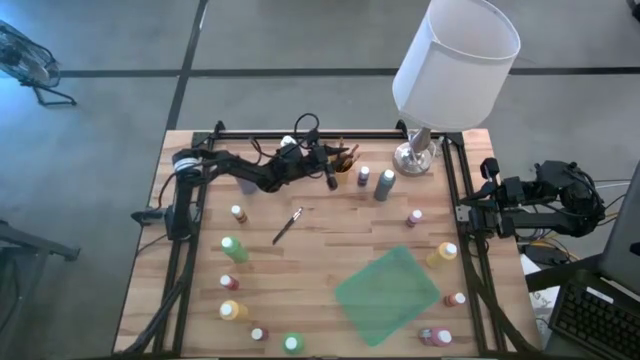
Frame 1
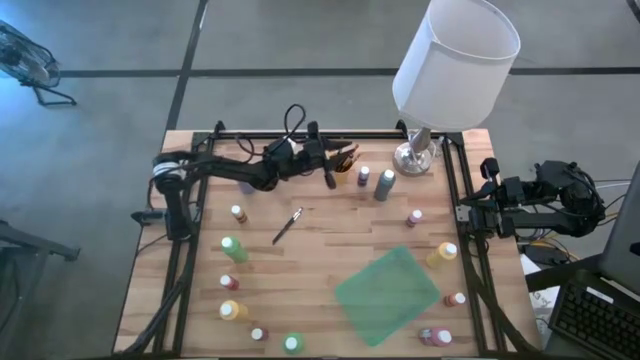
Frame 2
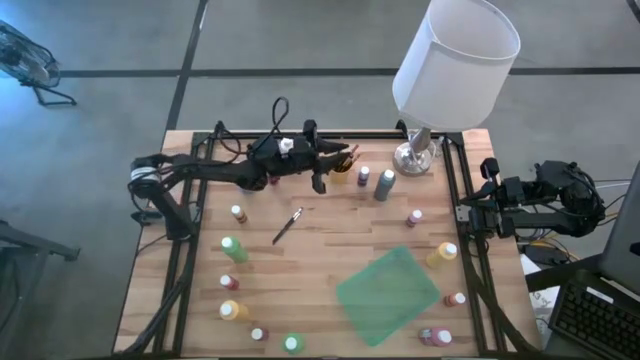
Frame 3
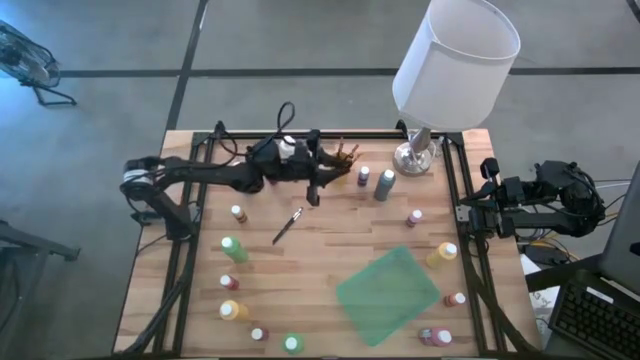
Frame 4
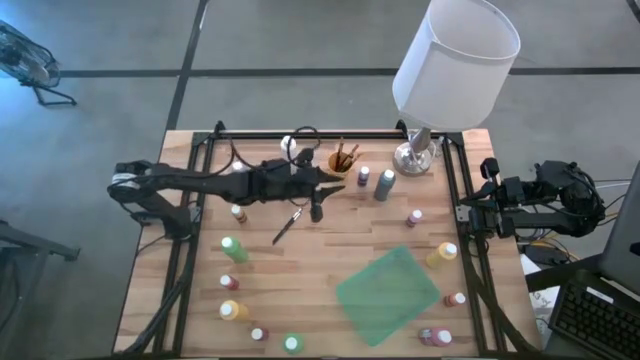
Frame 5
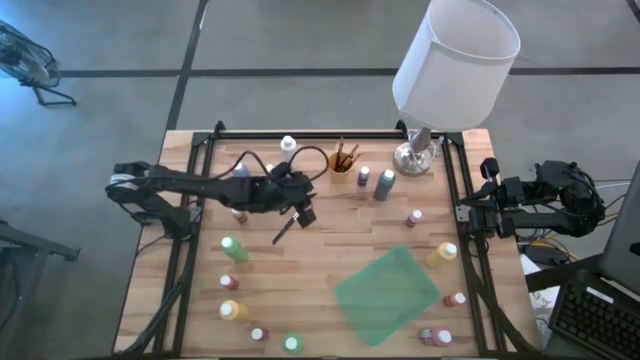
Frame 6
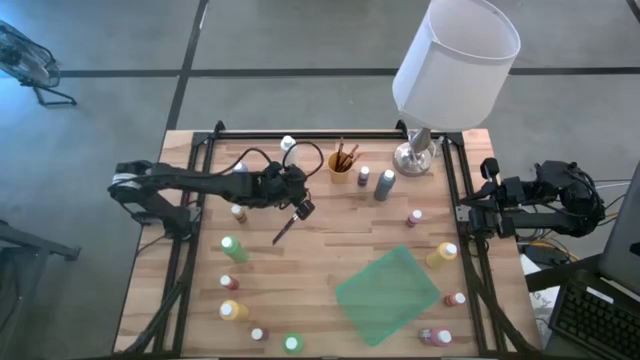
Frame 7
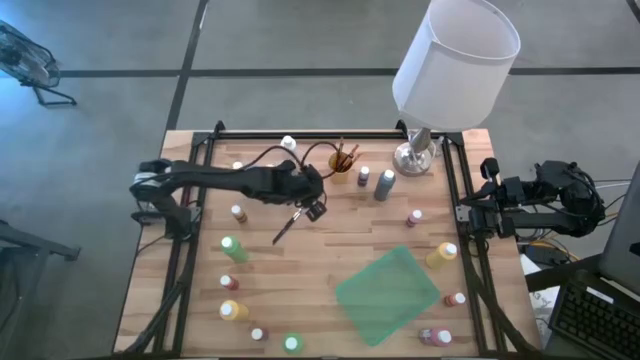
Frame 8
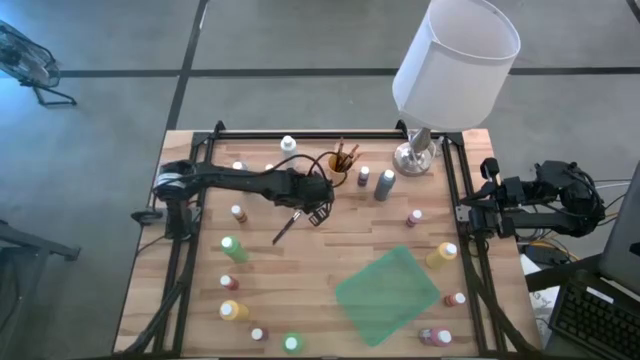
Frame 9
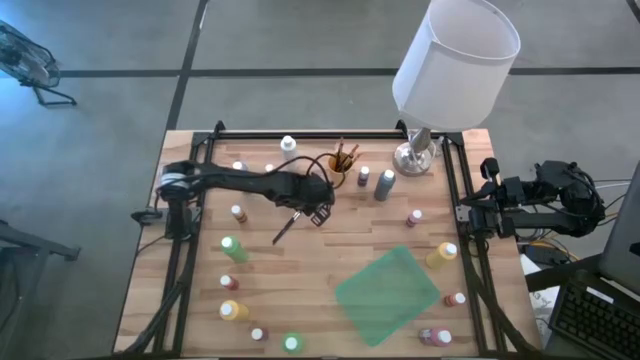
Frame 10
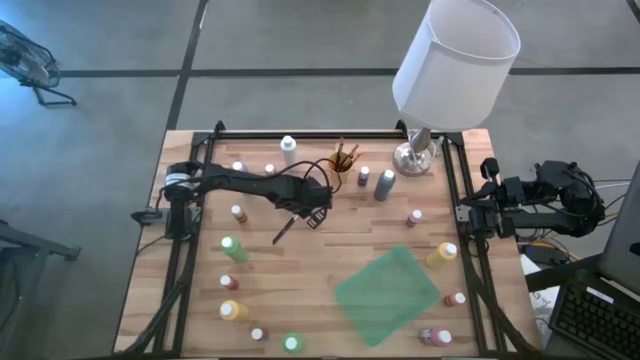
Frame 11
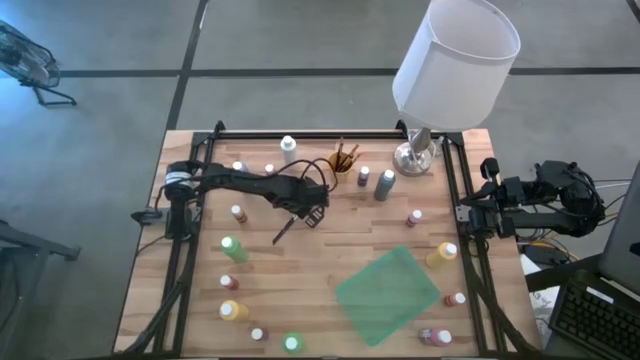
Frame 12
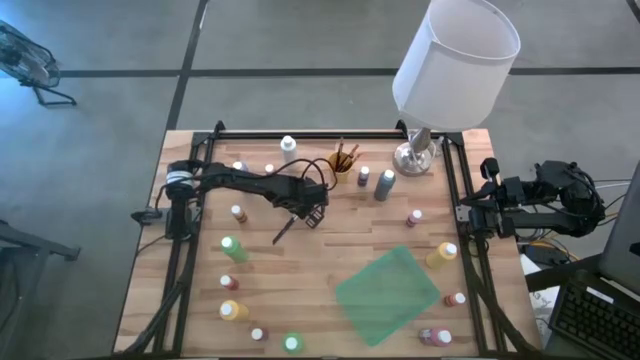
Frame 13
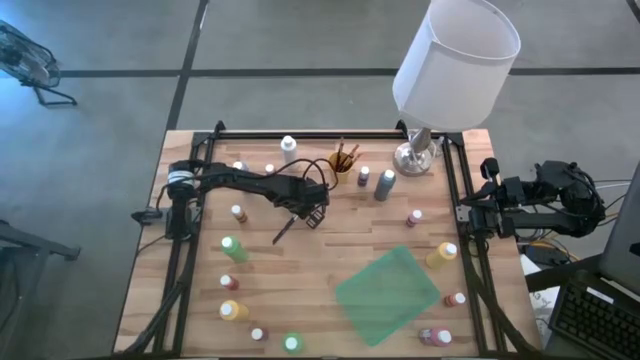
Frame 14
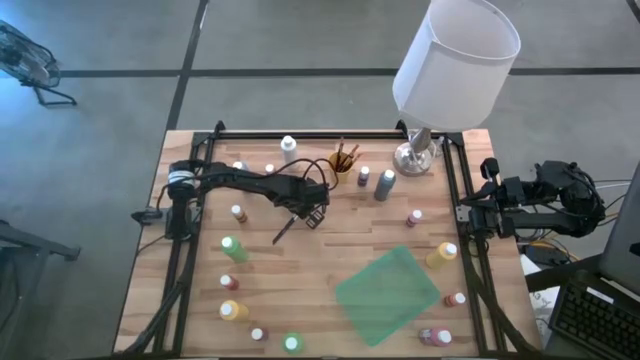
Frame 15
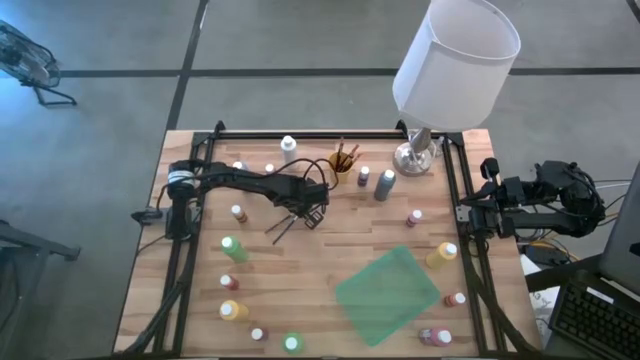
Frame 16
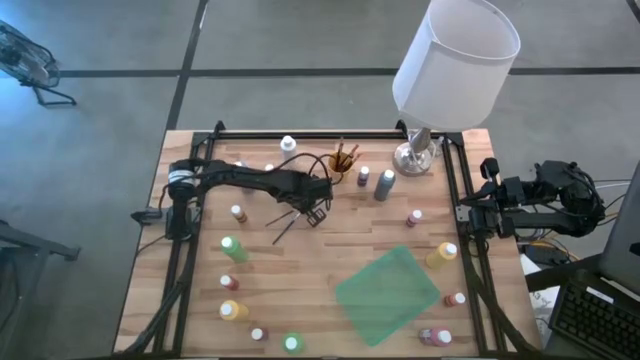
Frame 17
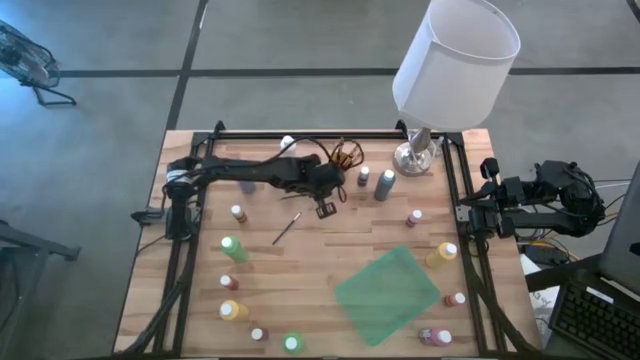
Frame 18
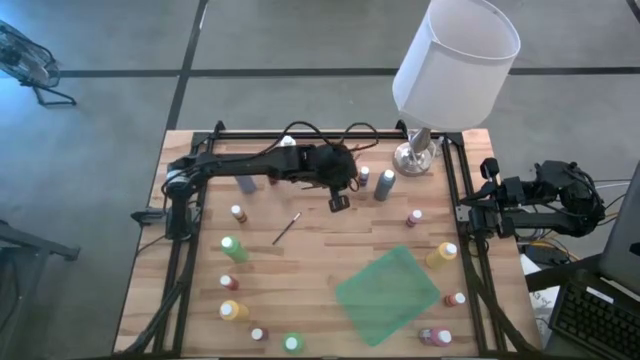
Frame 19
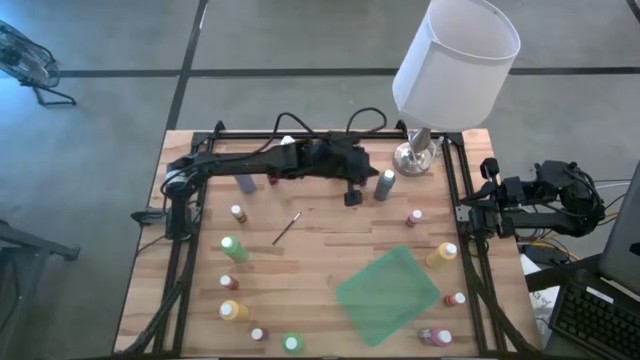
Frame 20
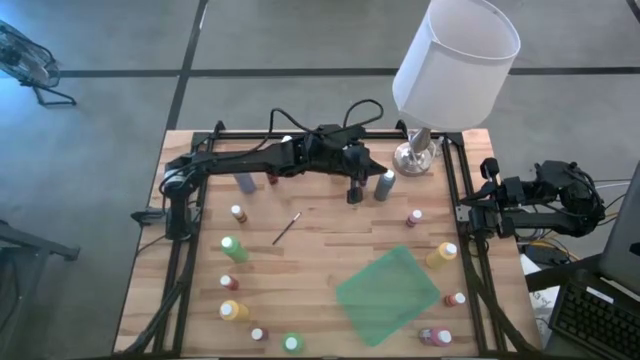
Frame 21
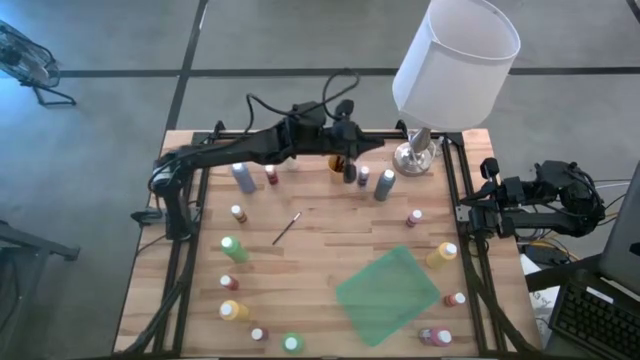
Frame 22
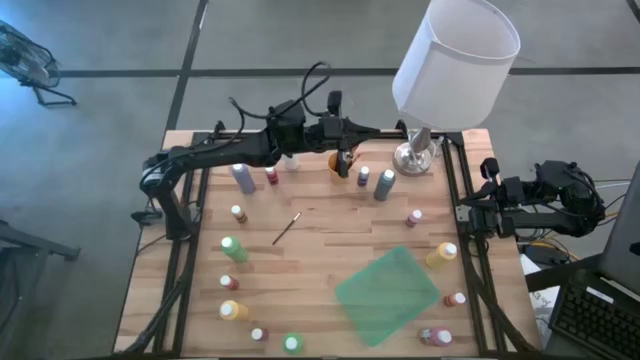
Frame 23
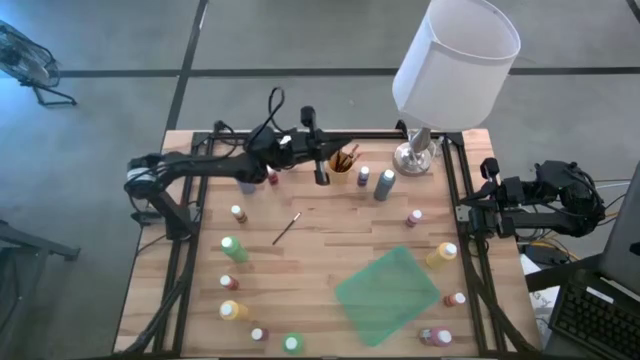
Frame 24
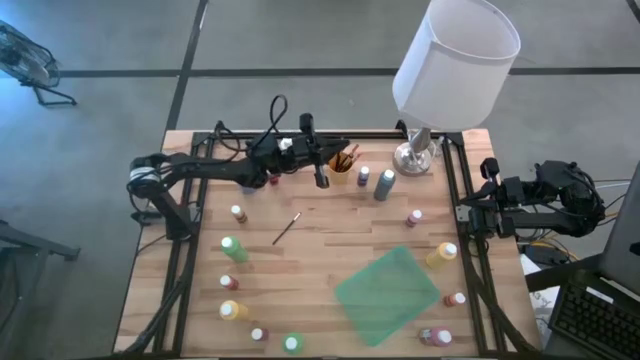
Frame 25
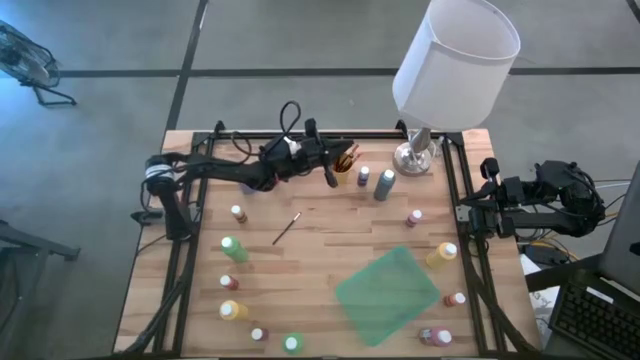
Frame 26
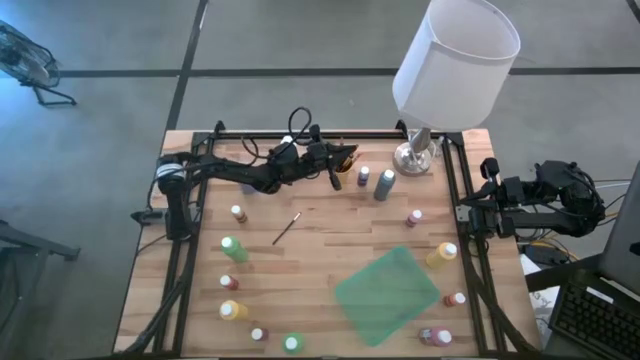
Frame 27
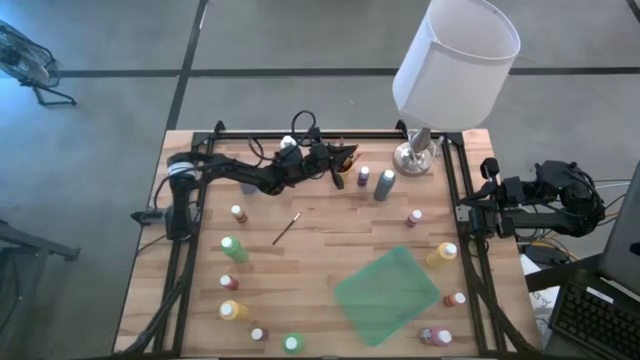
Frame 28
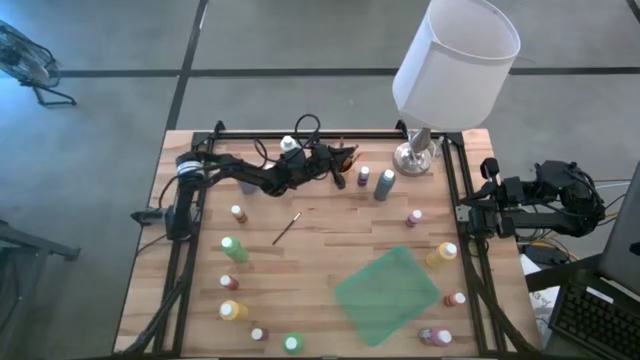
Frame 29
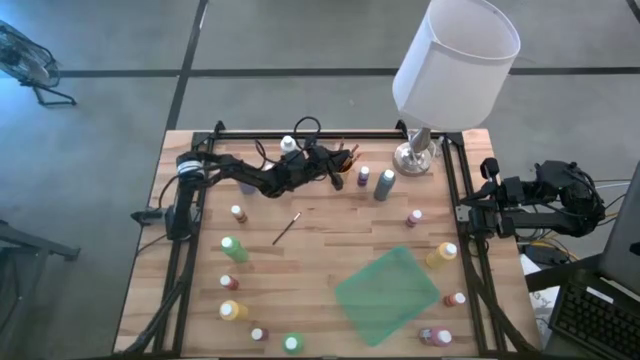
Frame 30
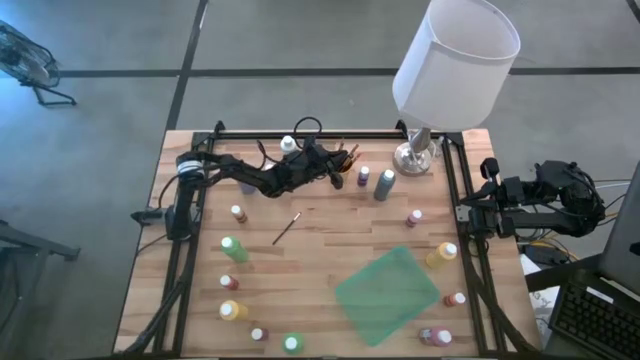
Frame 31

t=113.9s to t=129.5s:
Task: Pick & Place Paint Supplies
Put the silver paintbrush into the yellow cup

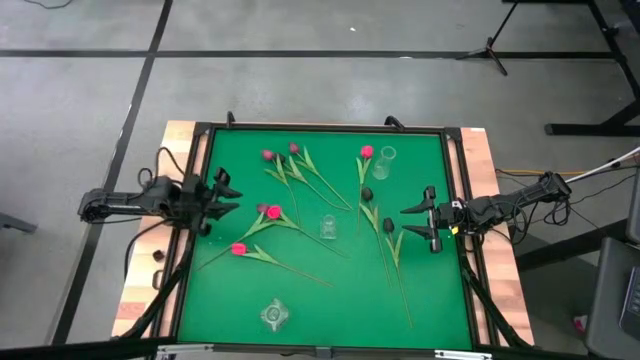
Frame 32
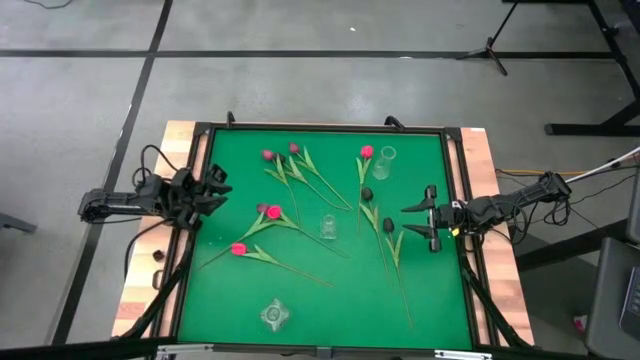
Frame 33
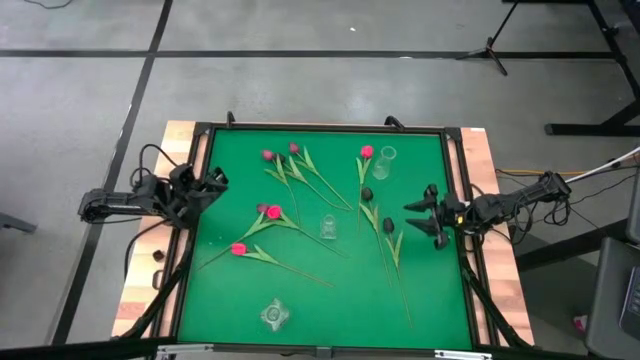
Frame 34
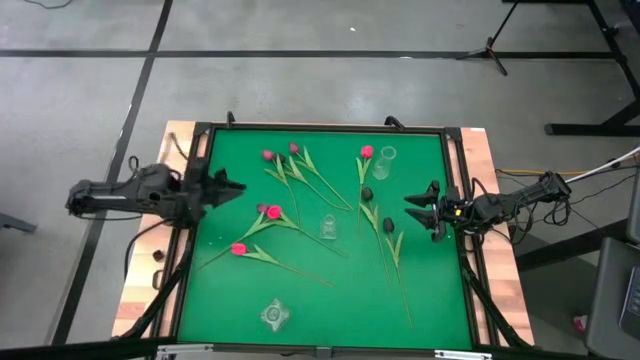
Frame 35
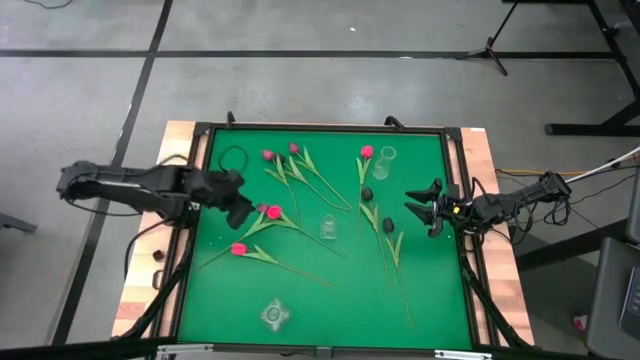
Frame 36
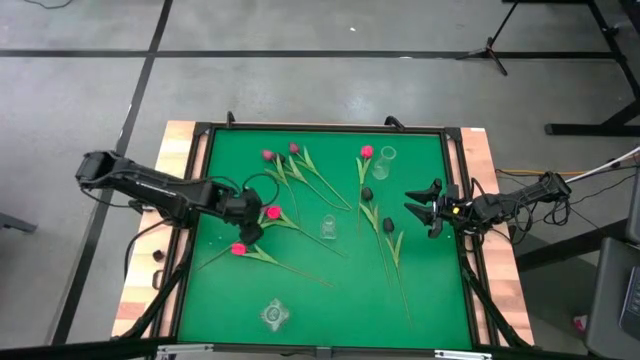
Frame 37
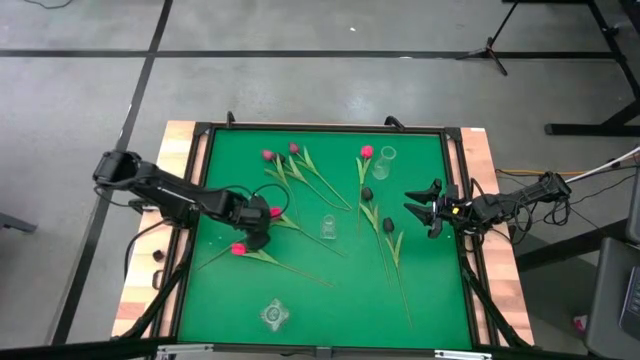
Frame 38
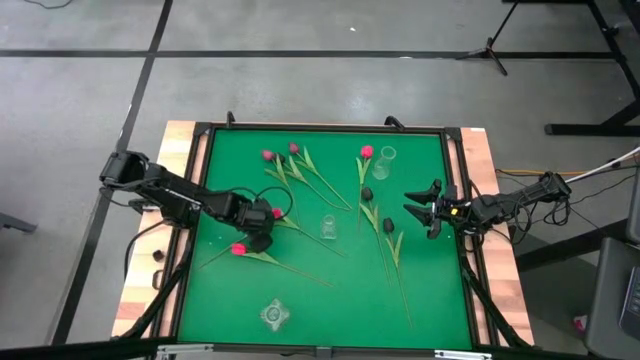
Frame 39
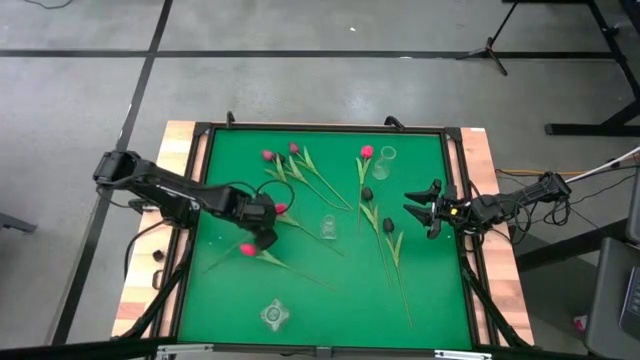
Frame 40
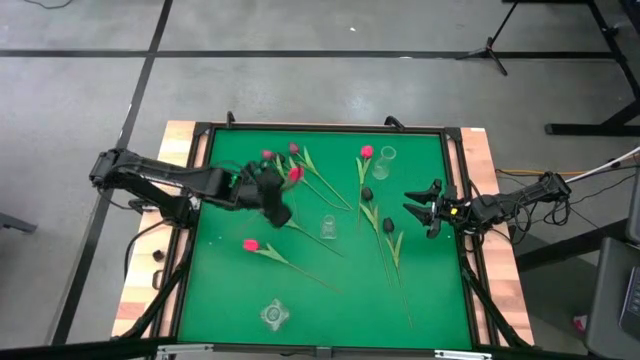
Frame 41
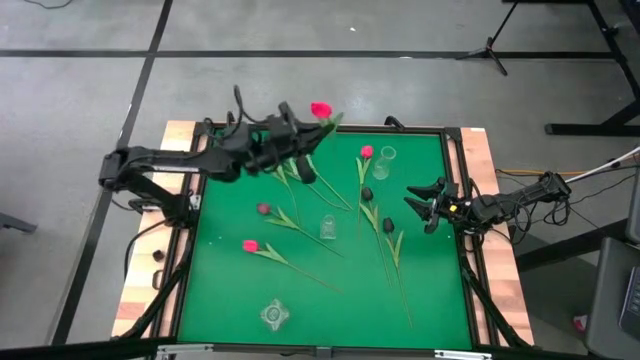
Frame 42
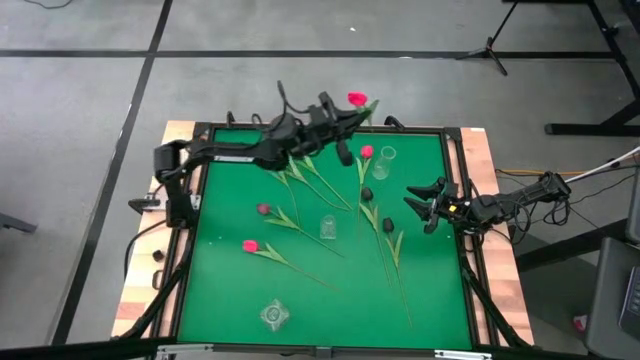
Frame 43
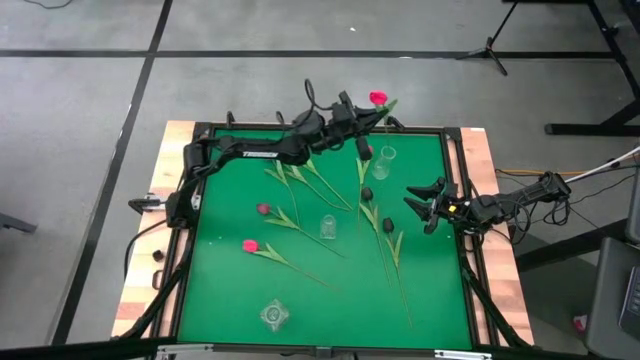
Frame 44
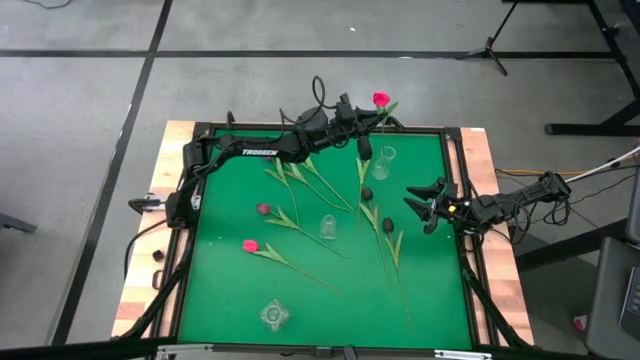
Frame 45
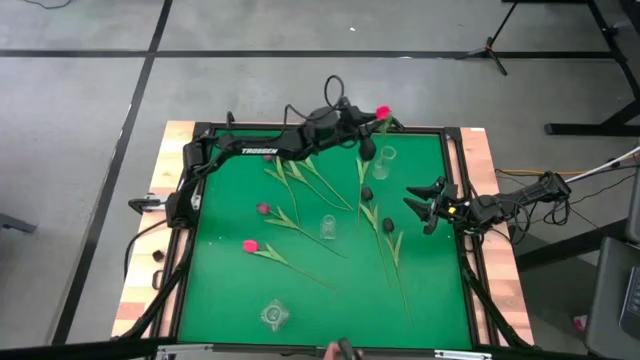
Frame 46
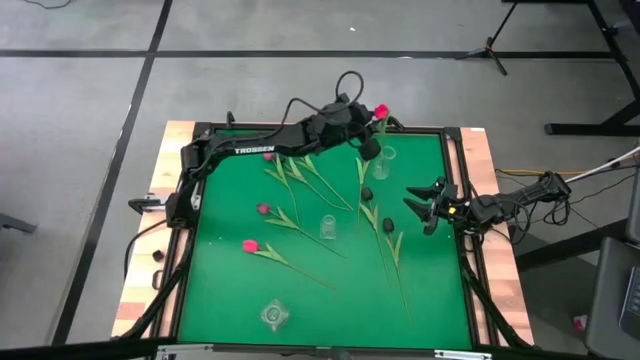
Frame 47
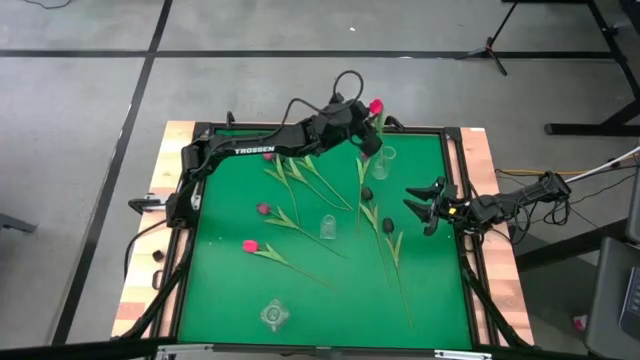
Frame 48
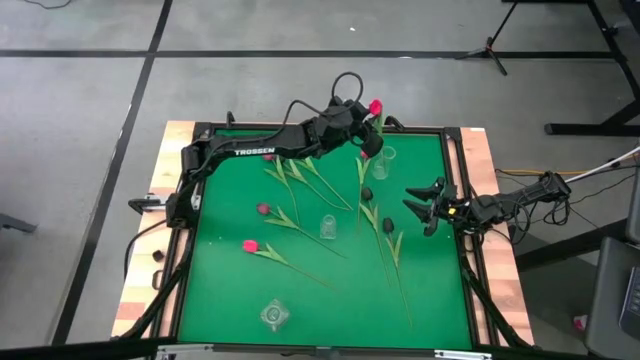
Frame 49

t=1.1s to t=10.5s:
Task: Sort flowers into vase by color
Put the middle left pink tulip into the top transparent vase
